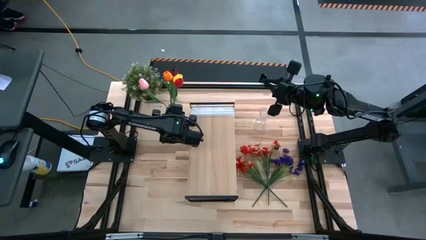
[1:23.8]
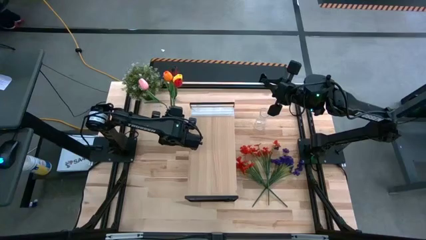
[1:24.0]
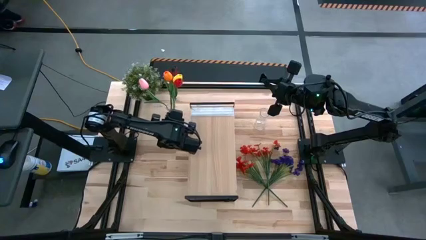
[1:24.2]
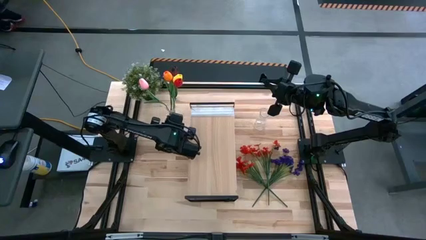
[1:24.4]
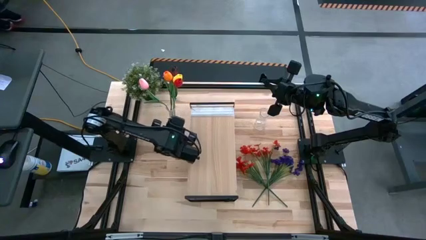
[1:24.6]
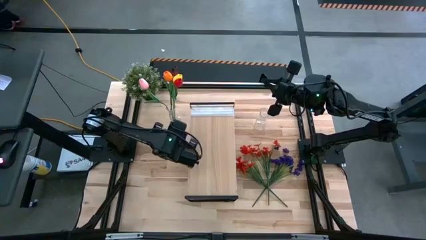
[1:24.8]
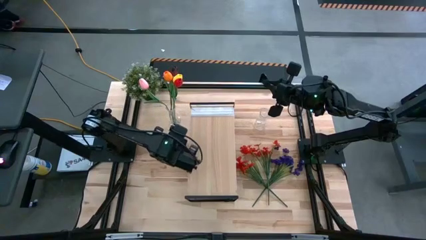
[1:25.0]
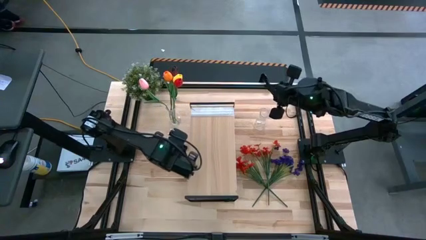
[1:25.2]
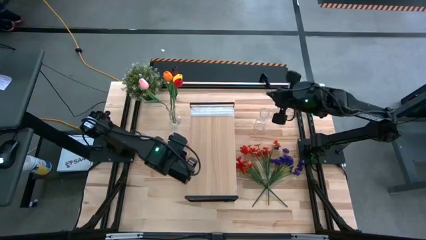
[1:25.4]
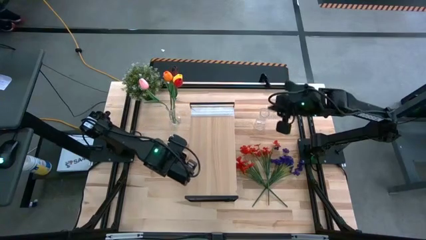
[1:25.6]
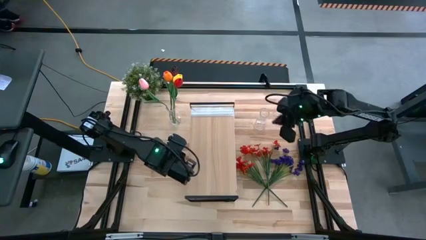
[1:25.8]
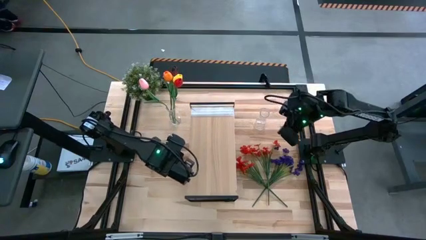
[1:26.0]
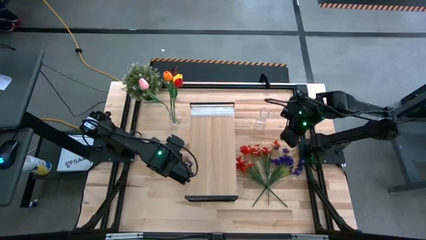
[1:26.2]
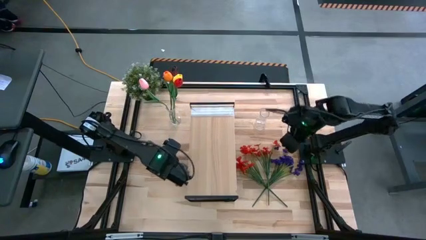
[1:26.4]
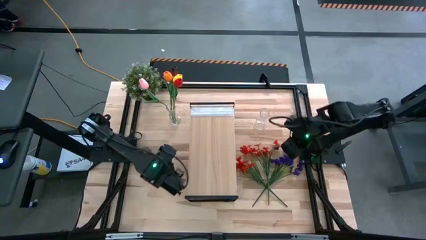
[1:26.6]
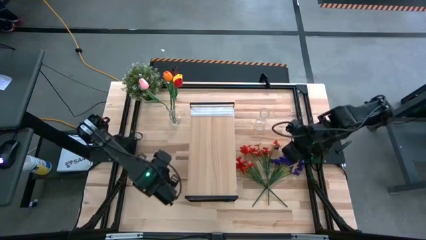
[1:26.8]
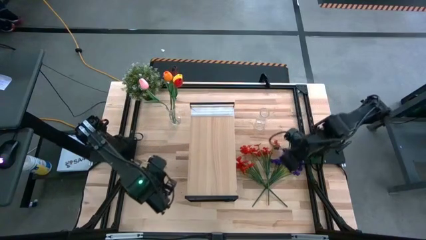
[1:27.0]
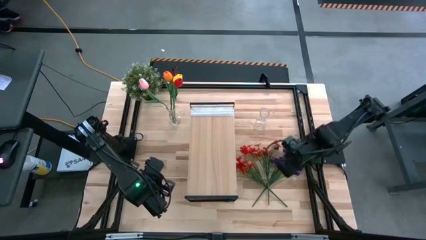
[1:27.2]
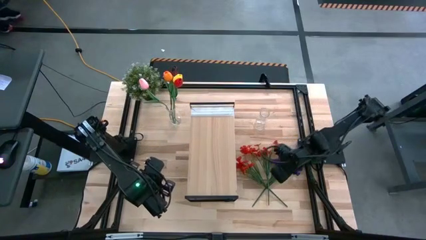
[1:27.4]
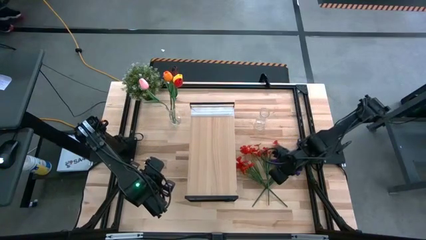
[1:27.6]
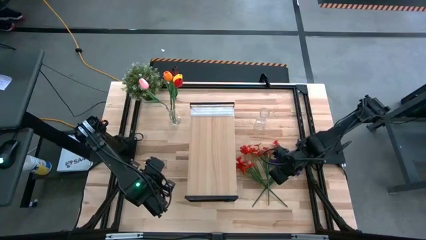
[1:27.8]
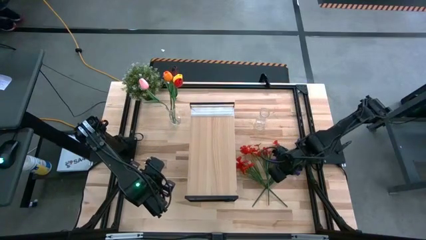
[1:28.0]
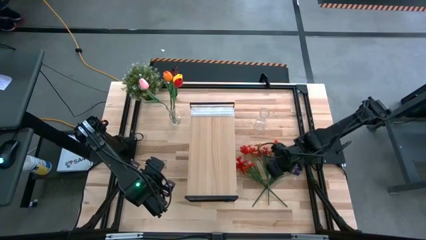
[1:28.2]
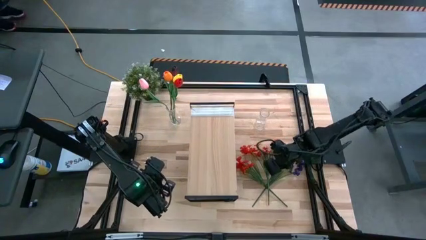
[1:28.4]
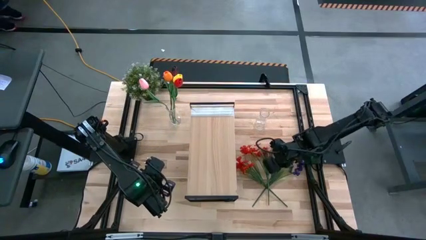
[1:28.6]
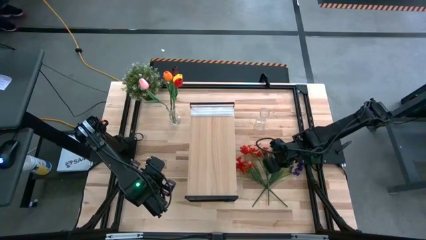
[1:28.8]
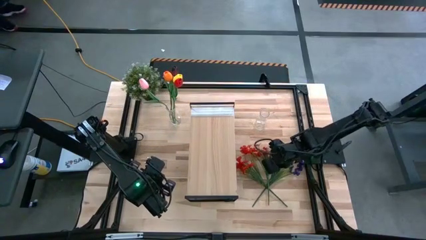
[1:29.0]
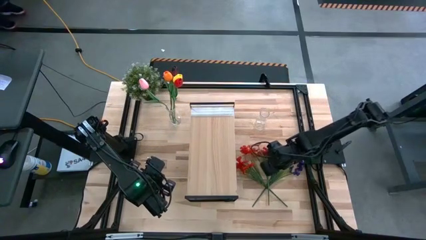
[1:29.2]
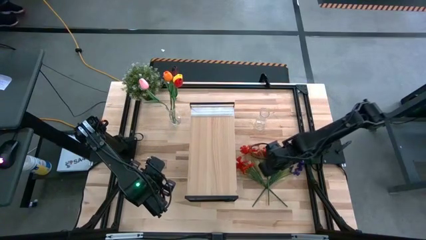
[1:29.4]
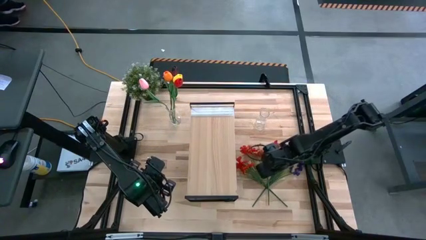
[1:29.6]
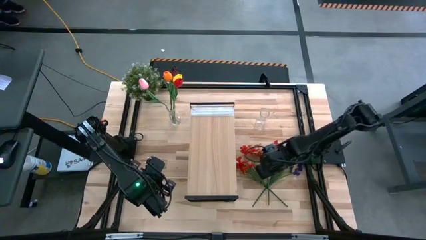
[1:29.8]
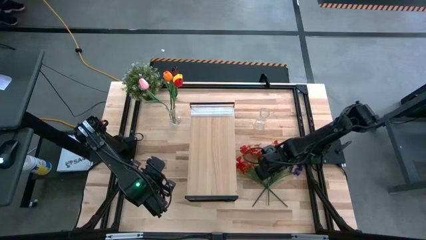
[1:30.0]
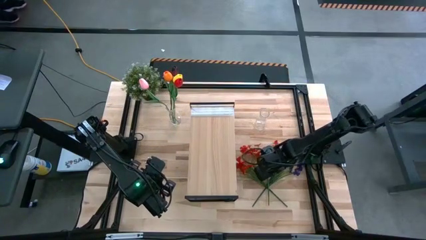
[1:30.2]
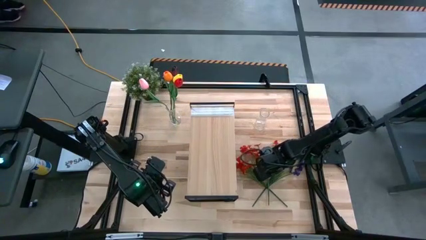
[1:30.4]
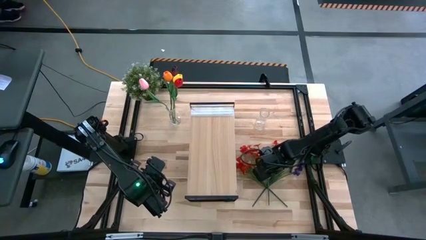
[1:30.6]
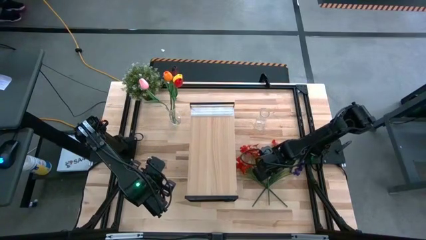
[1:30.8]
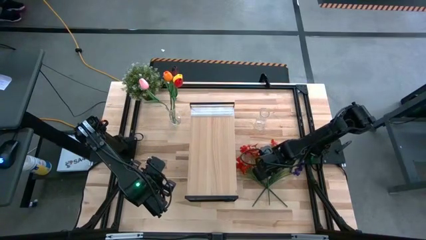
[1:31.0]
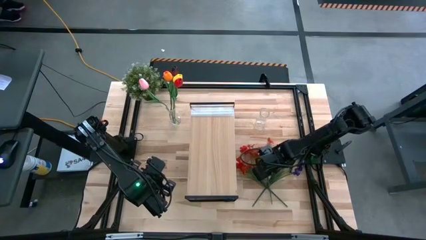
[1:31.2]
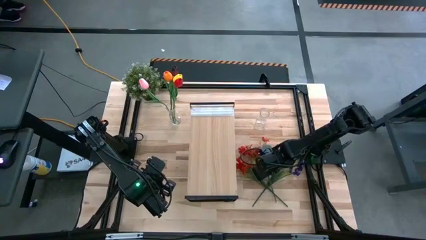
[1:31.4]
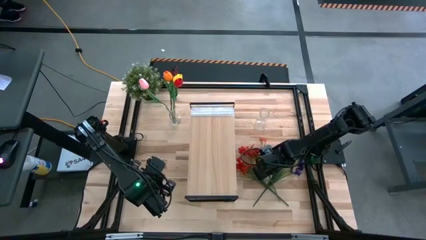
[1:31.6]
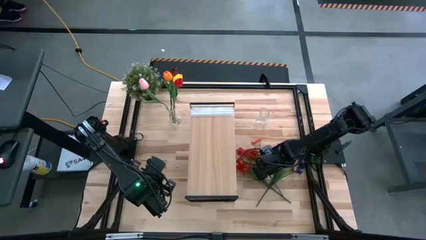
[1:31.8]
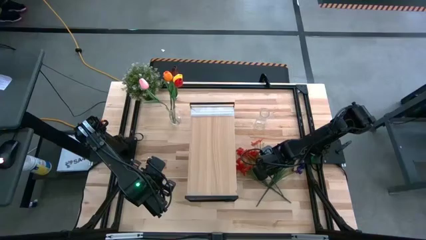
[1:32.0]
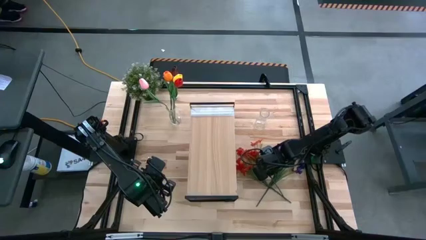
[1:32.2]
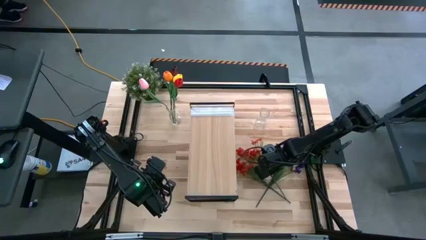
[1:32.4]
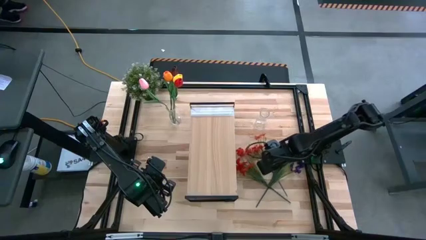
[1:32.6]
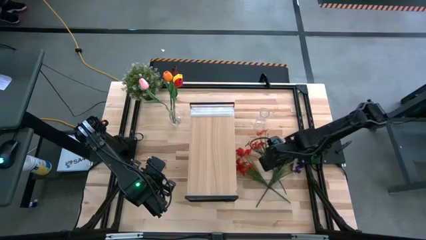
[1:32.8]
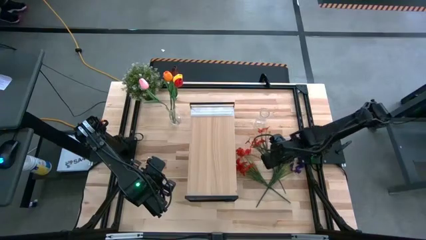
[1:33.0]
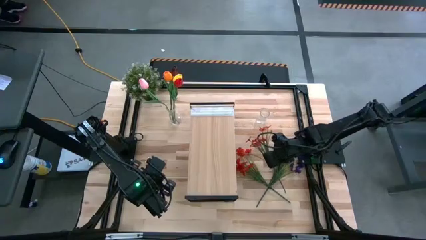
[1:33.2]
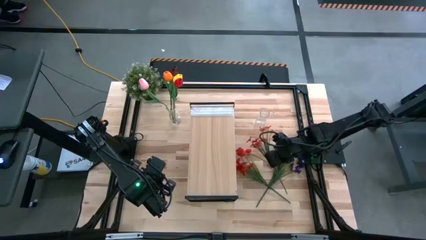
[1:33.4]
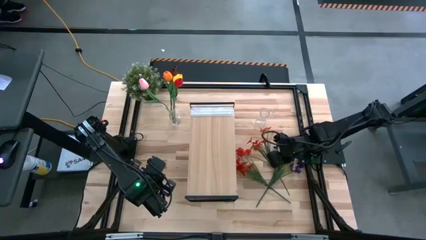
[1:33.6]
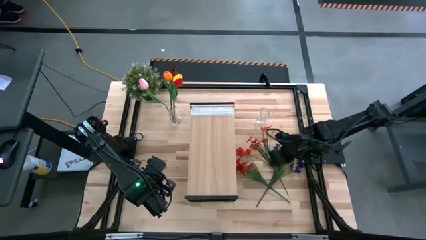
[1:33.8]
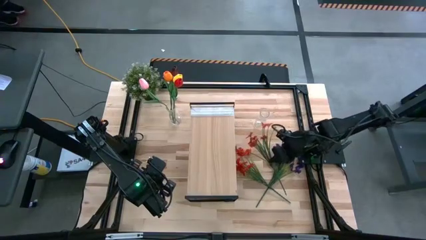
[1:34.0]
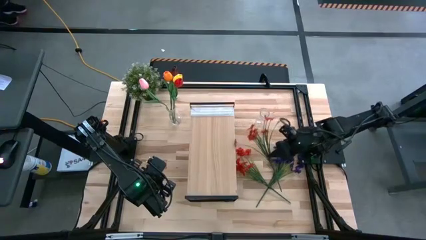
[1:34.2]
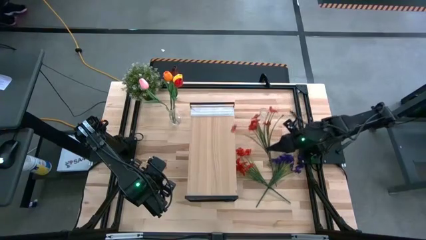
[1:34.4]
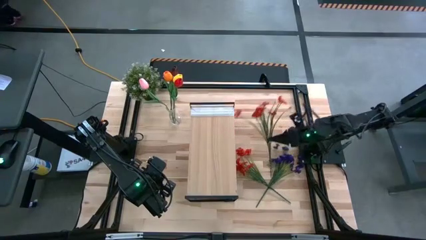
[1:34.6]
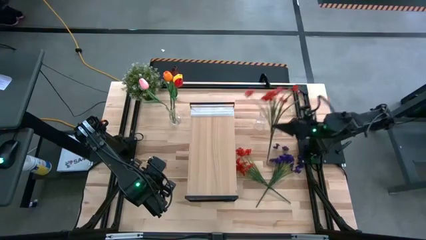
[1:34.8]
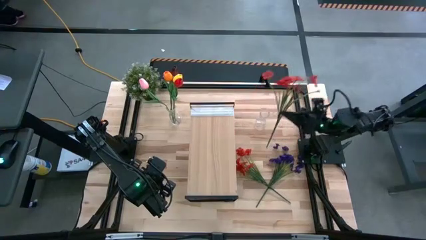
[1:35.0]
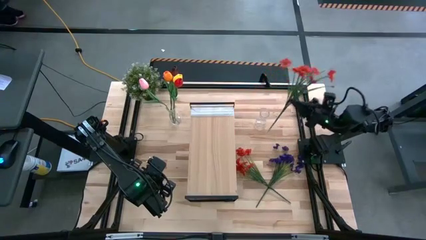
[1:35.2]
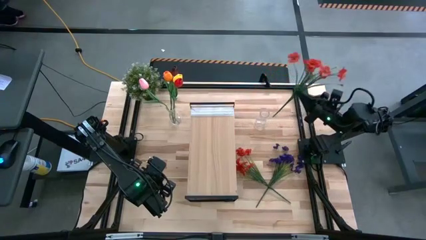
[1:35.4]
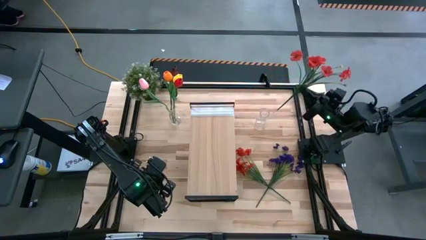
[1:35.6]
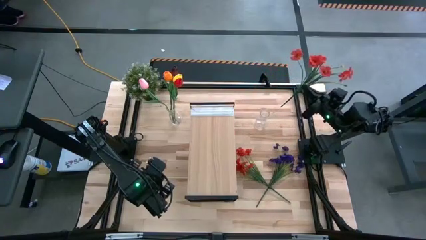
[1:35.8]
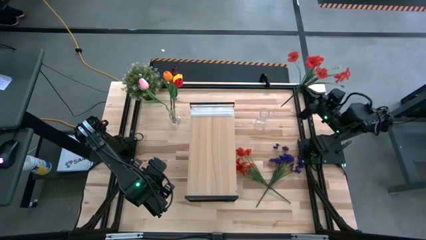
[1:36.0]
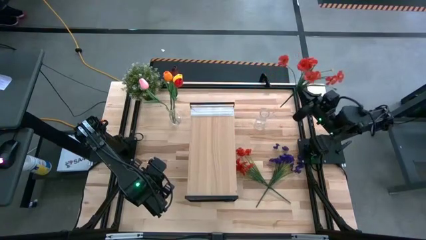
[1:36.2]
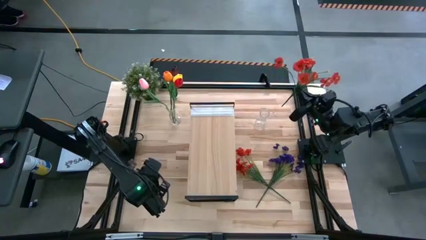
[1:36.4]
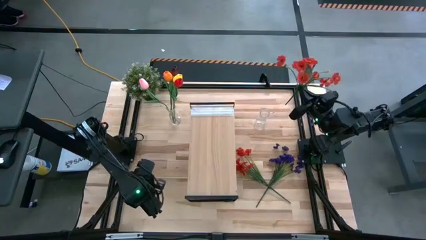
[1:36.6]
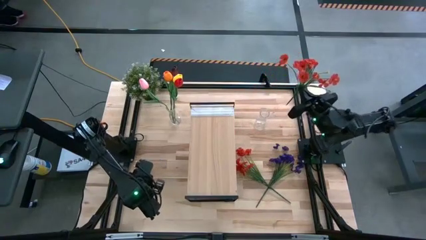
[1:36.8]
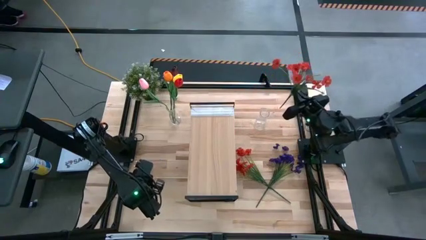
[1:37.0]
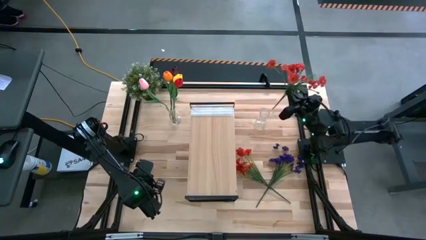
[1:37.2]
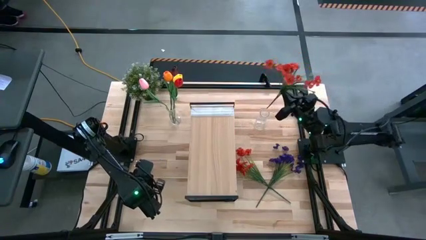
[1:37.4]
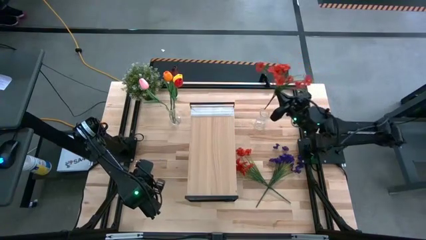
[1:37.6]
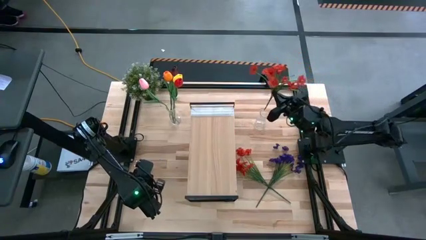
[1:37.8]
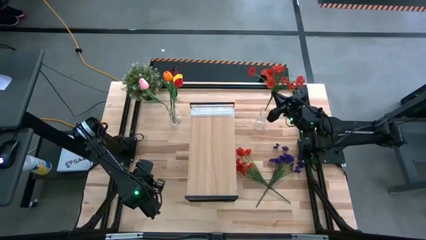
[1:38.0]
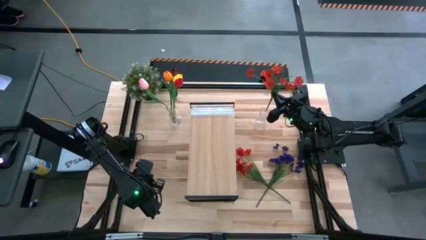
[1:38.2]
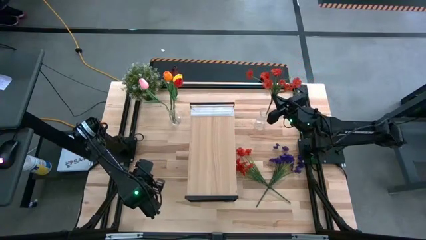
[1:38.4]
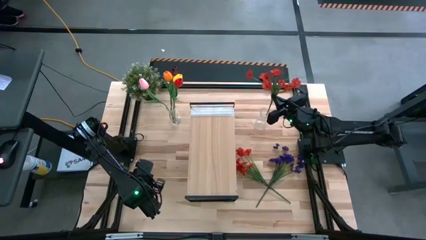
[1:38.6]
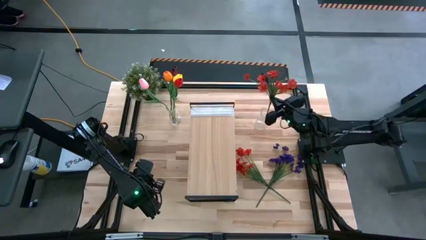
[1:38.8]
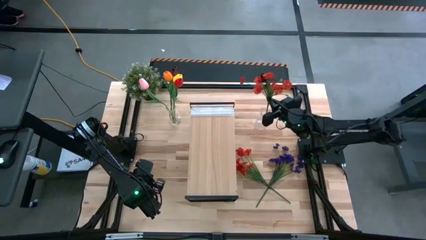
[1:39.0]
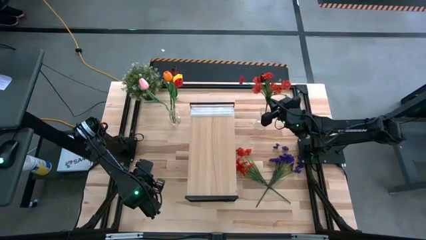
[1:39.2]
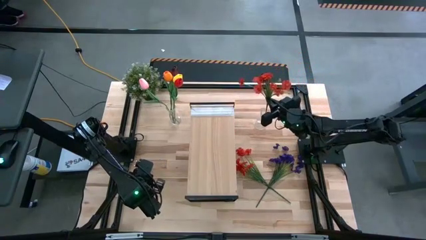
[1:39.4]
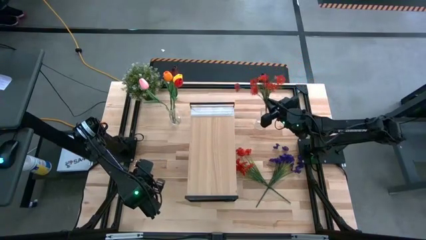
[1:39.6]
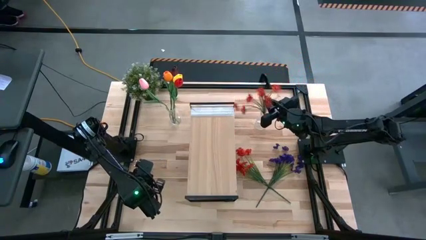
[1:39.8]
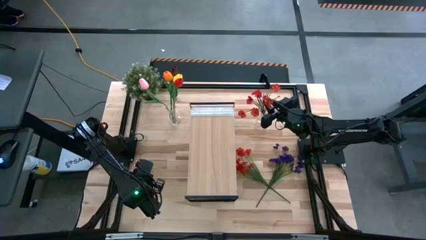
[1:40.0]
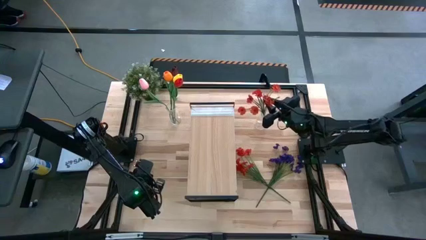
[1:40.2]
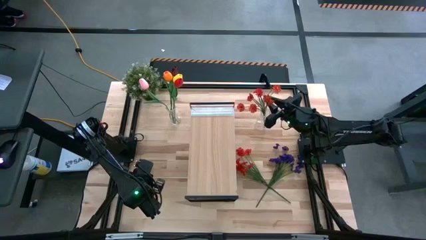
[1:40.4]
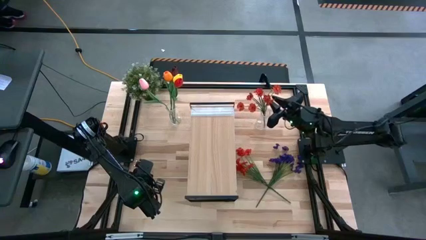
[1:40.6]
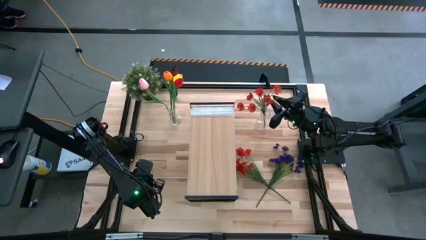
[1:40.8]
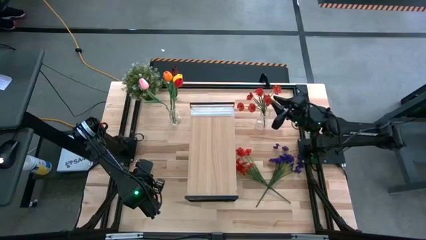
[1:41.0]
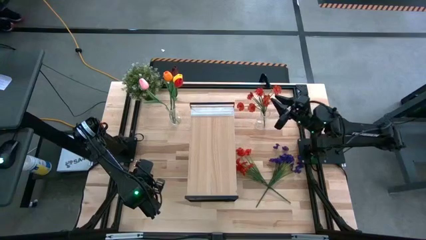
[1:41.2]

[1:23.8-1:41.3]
Task: Pick and place flowers into a vace then onto a shelf
Put the right orange flowers into the right transparent vase
